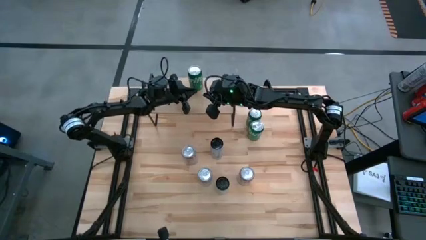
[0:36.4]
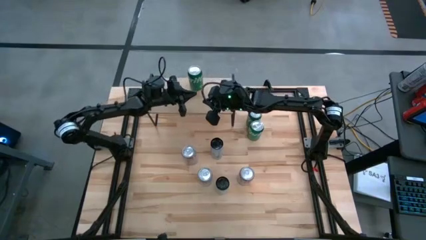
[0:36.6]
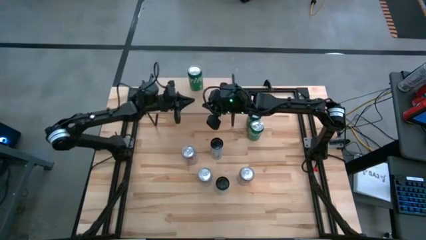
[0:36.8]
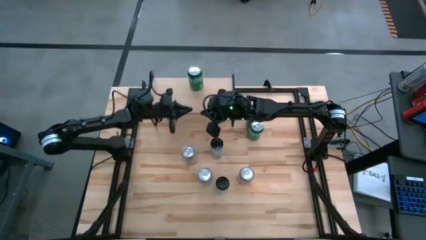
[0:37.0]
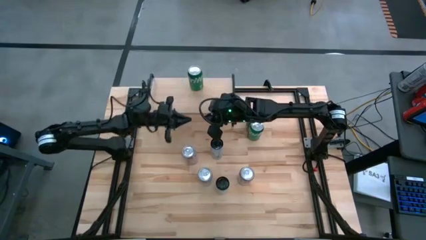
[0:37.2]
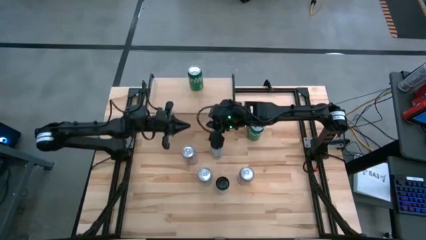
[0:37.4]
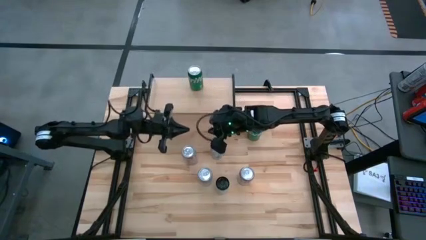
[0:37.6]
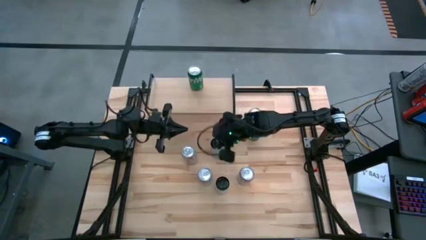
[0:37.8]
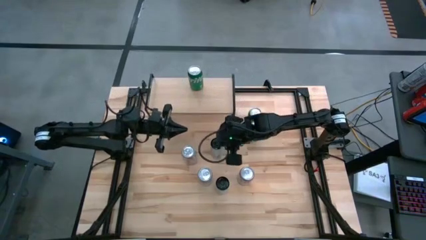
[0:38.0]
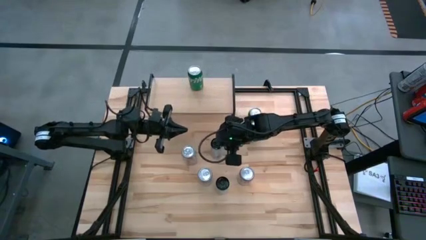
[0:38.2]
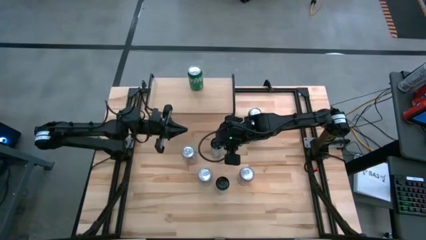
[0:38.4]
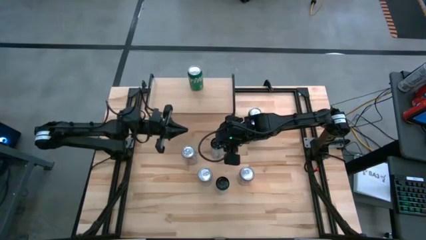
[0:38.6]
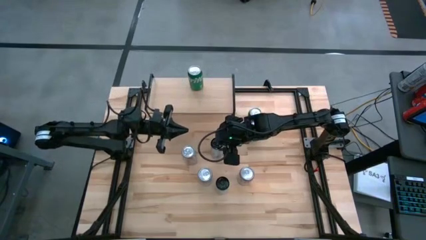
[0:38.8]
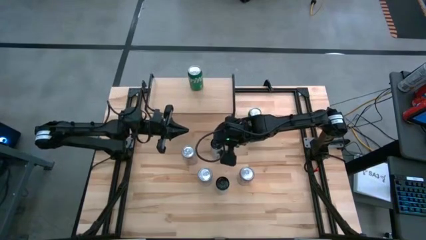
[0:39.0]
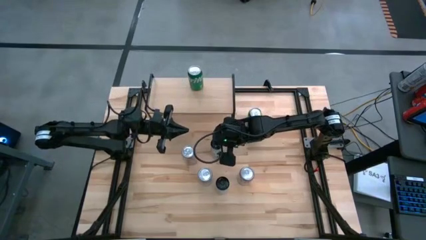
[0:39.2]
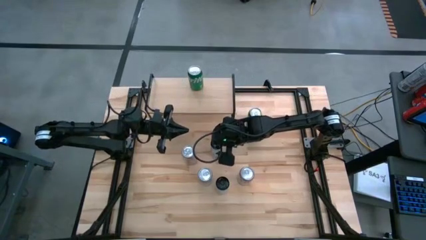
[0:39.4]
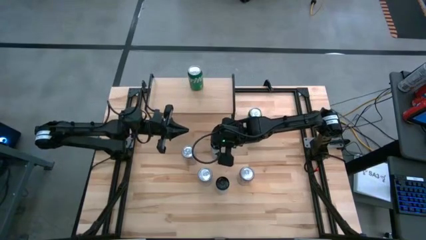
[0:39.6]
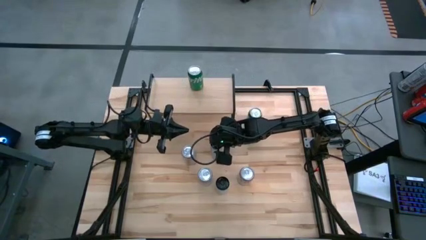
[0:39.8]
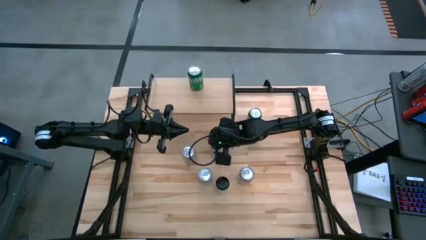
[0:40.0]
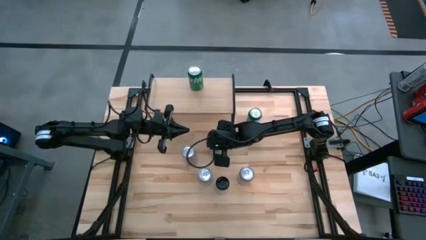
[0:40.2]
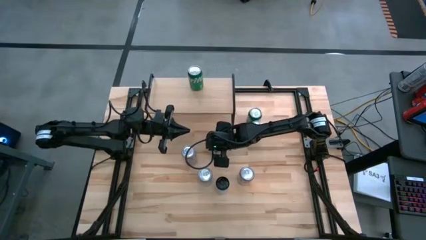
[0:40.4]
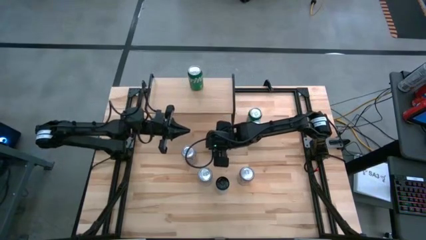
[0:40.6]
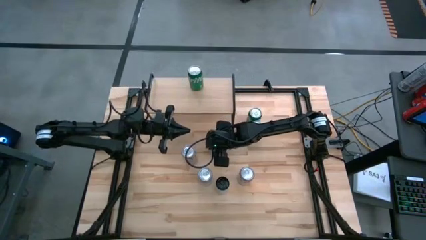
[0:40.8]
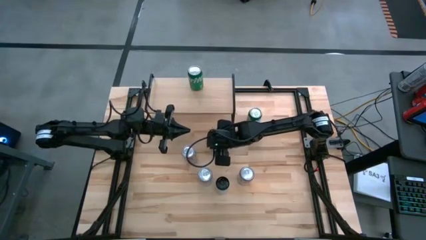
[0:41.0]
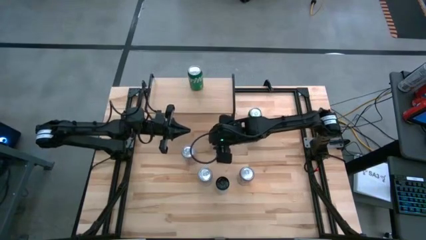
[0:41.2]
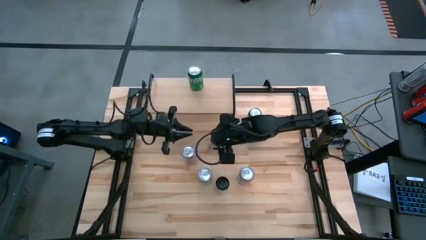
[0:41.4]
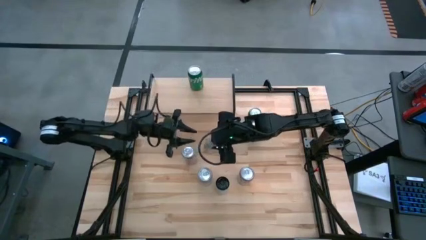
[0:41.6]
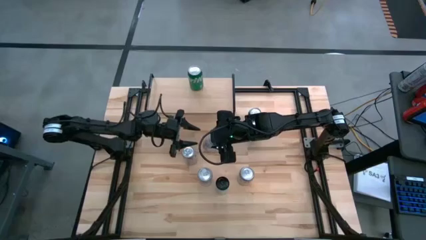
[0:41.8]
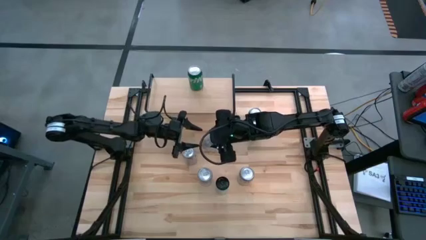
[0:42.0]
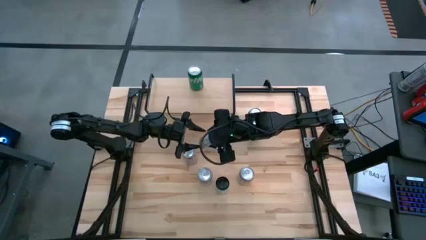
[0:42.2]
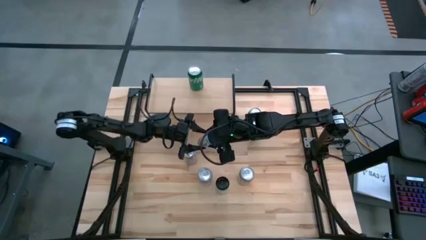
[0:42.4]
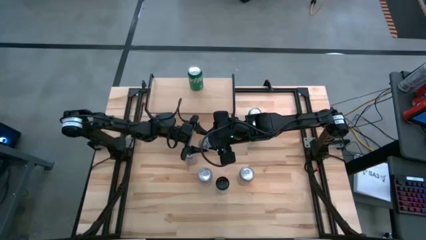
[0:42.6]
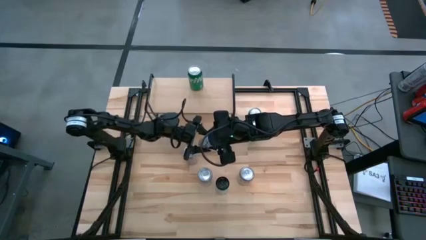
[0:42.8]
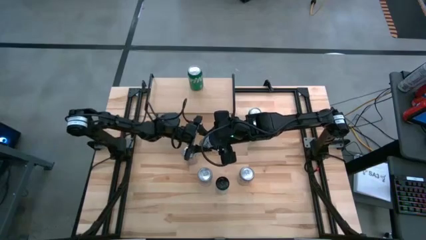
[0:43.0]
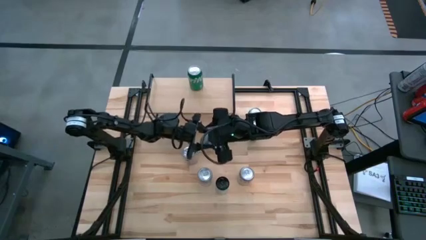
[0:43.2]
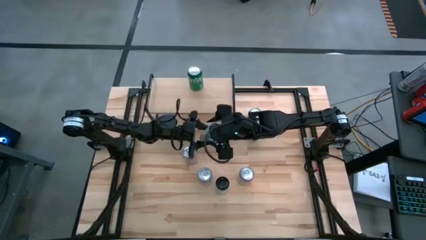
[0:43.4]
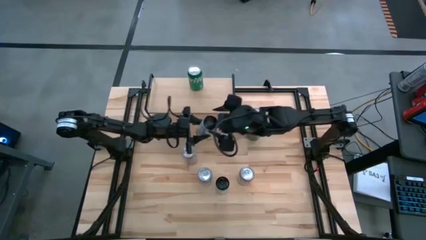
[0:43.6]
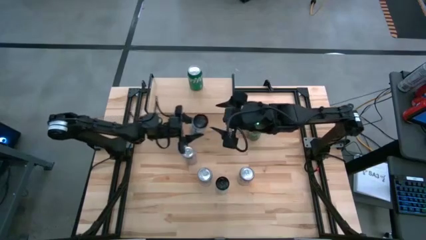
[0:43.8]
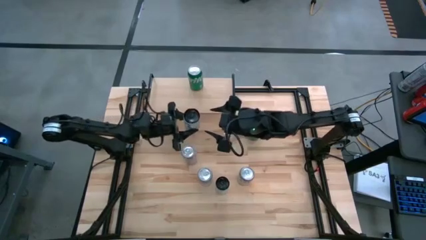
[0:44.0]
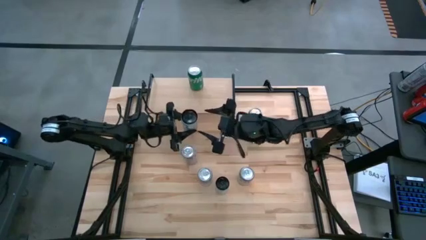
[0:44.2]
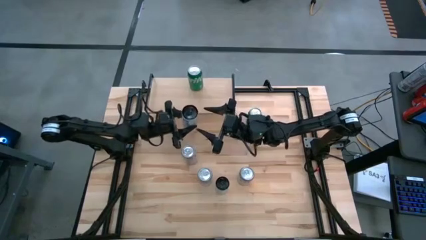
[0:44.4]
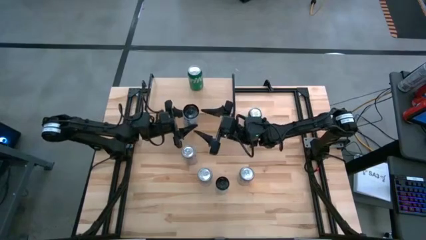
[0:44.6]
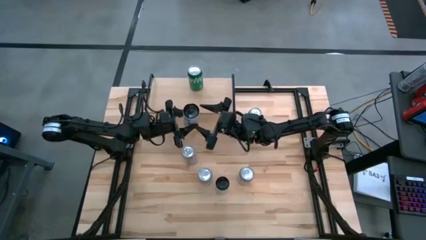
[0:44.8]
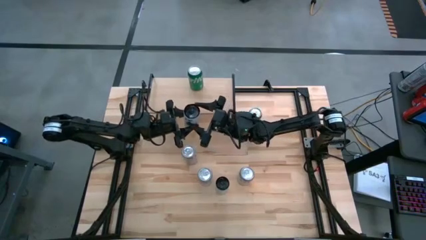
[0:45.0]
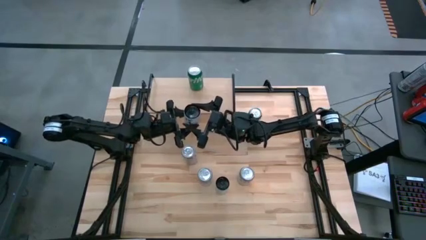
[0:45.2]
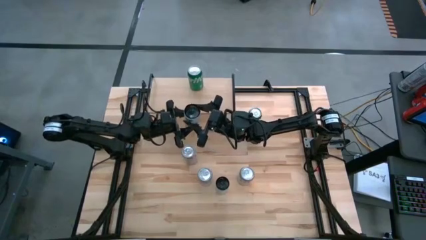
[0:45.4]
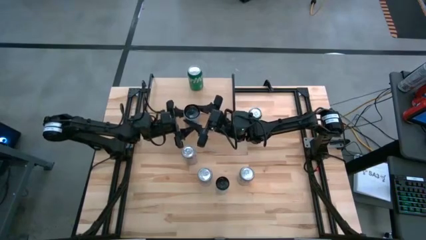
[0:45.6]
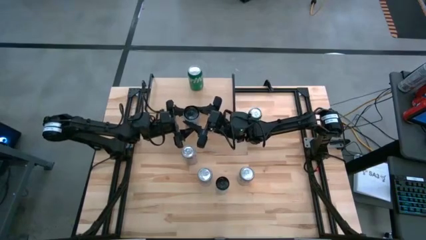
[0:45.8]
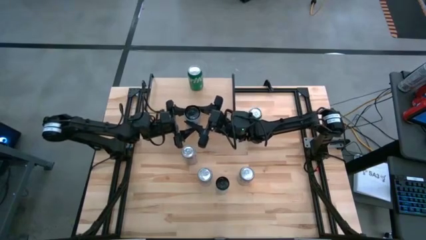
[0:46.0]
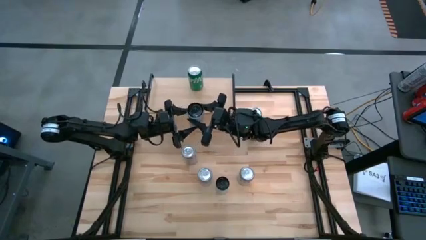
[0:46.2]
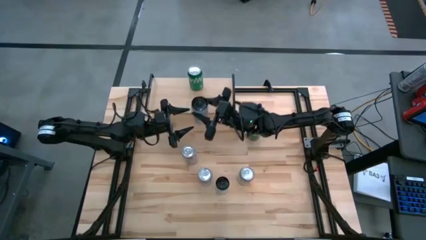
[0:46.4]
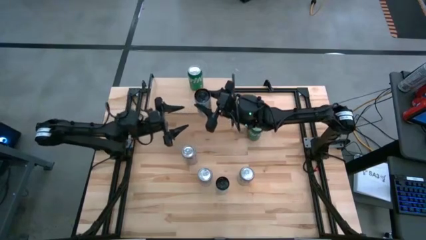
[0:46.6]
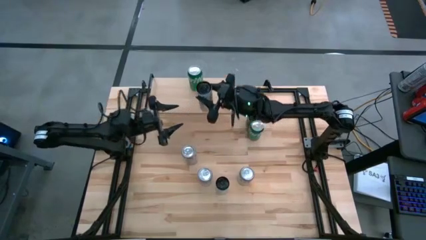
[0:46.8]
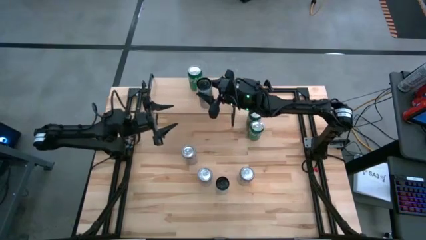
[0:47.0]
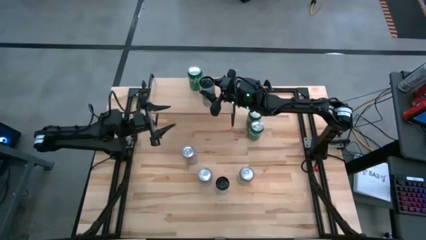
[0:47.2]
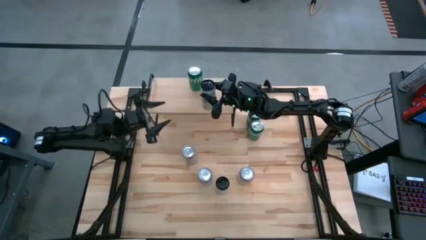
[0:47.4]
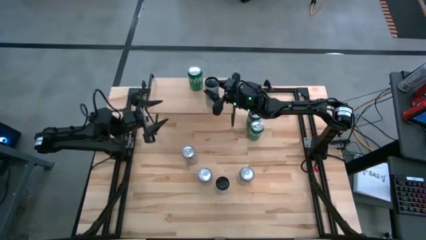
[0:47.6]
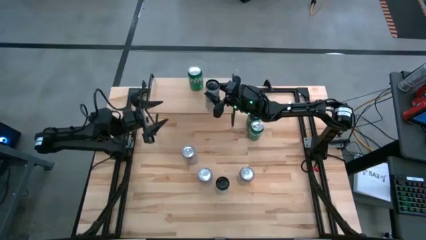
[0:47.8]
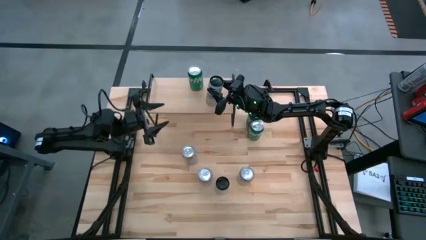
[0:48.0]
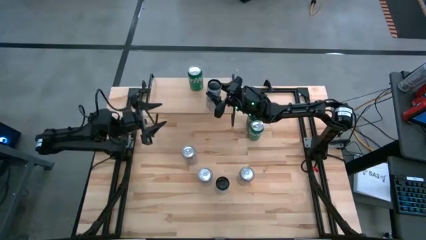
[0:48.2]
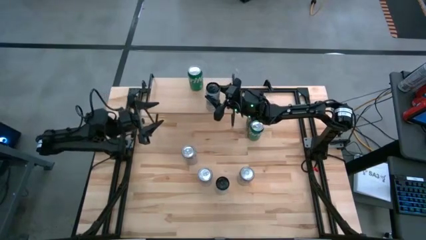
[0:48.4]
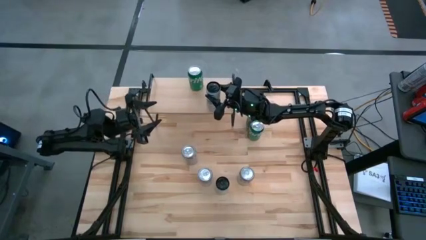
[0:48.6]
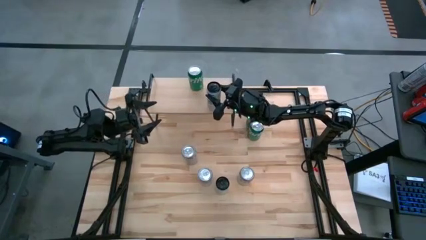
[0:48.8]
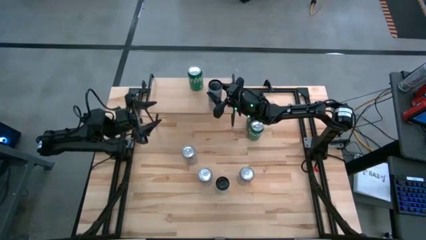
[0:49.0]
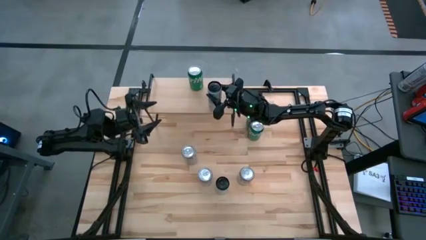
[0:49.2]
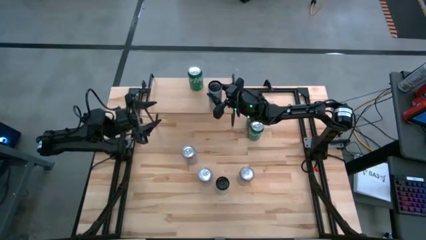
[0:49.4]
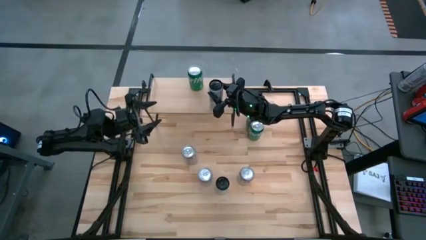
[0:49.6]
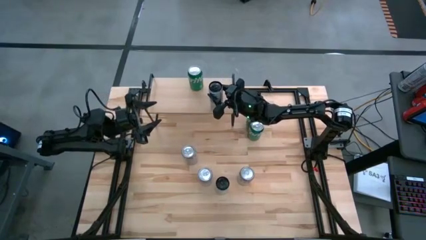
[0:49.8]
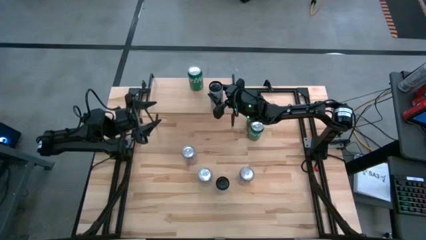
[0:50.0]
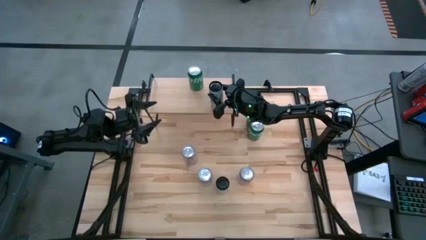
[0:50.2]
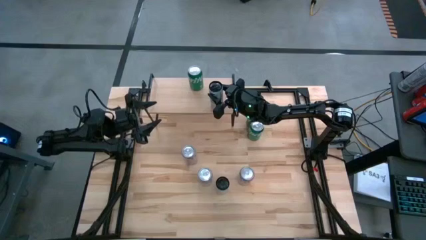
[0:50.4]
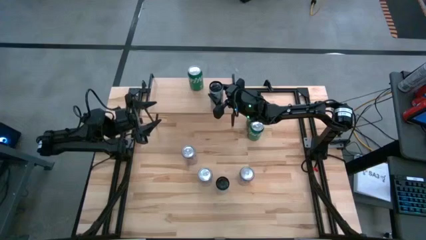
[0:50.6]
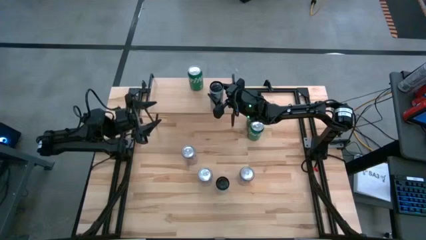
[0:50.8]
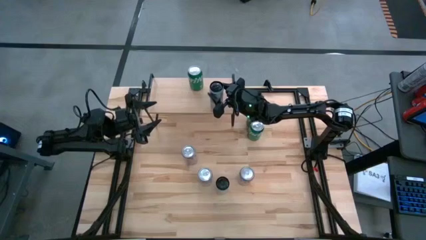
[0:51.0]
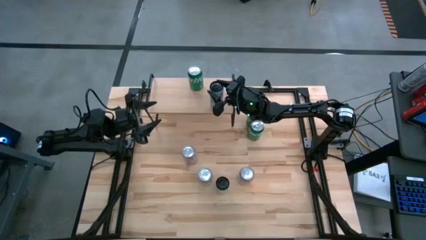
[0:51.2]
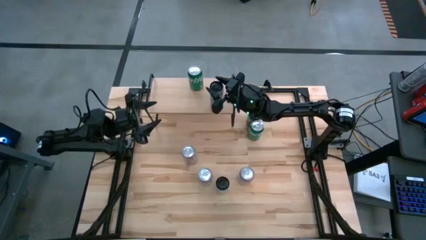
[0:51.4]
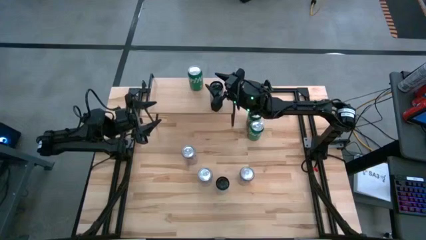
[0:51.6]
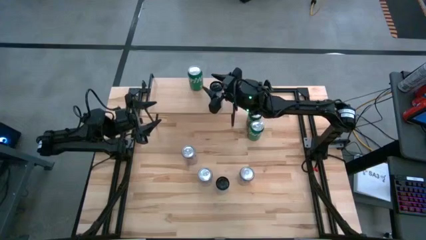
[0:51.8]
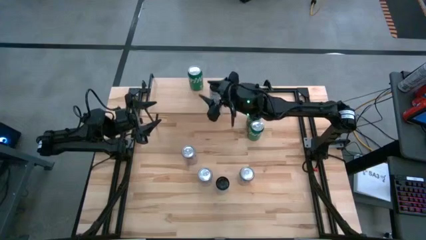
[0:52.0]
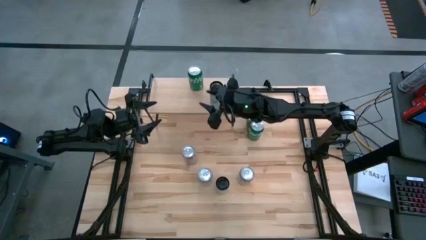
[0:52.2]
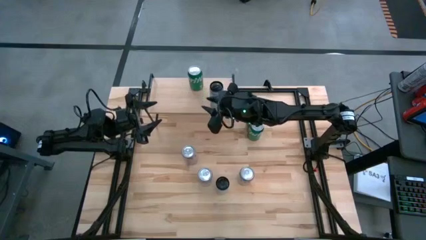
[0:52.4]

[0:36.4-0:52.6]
Task: Place canned beverage on shelf
Put the top white-blue soda can on the shelf
